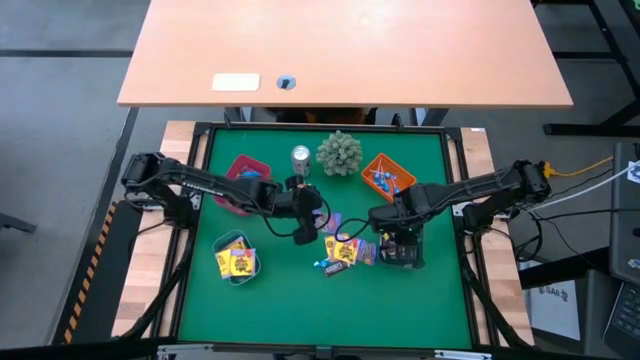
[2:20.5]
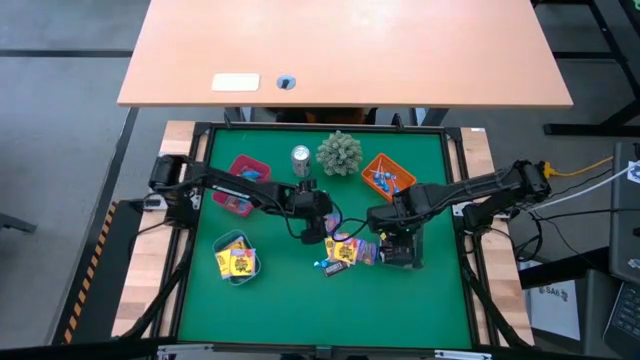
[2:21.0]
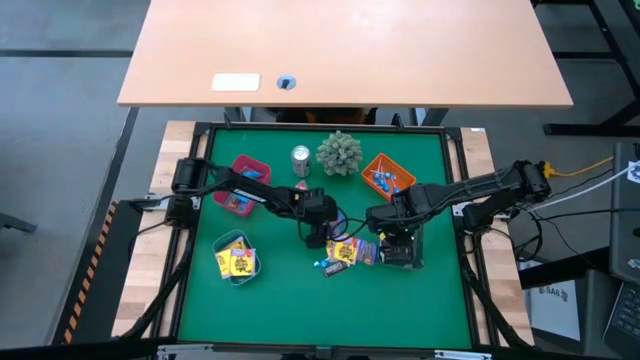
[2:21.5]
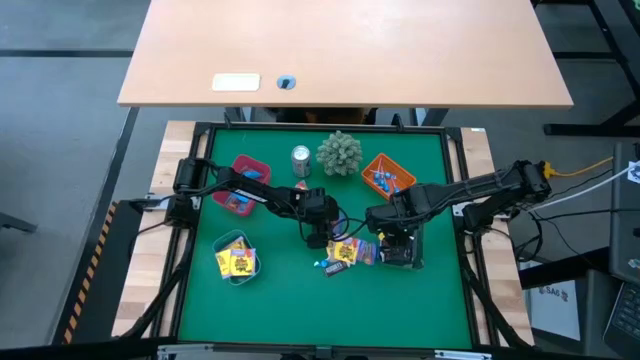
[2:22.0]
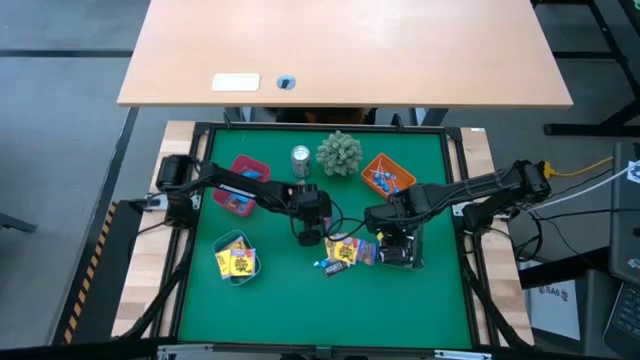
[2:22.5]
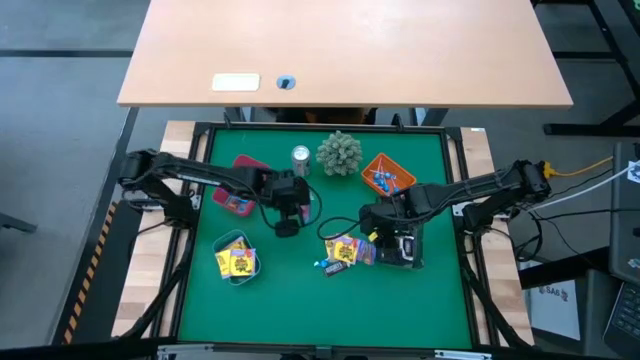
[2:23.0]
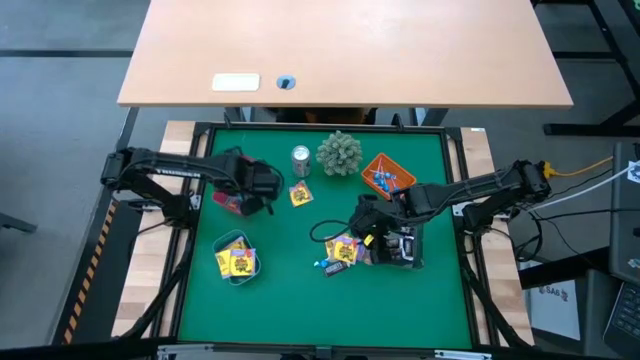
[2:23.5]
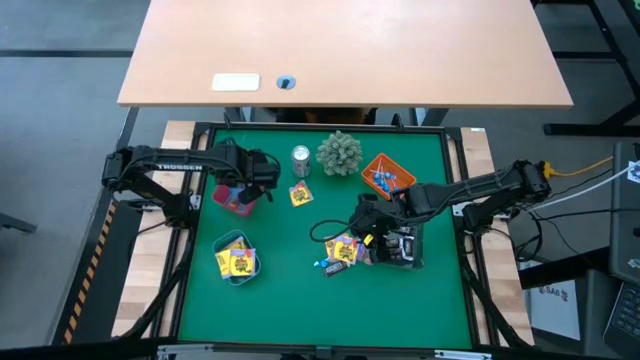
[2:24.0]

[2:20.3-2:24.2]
Task: Sort candy
Put the purple gummy into the red transparent bin

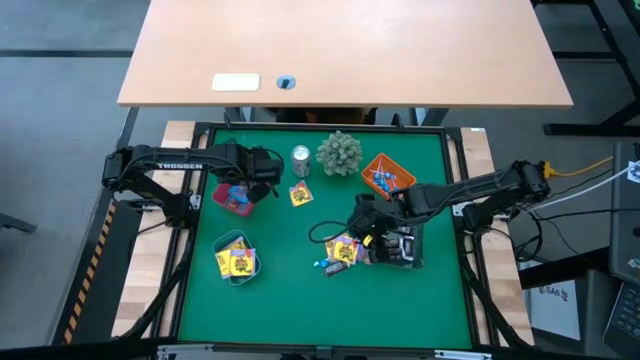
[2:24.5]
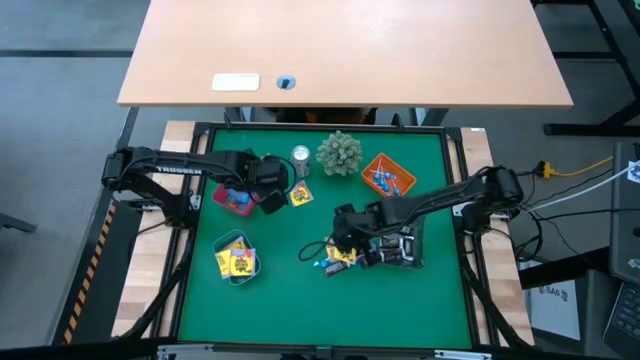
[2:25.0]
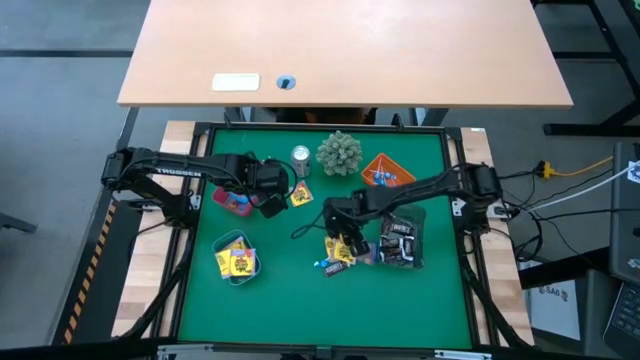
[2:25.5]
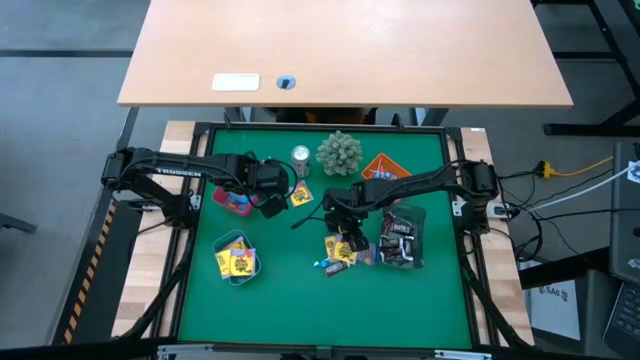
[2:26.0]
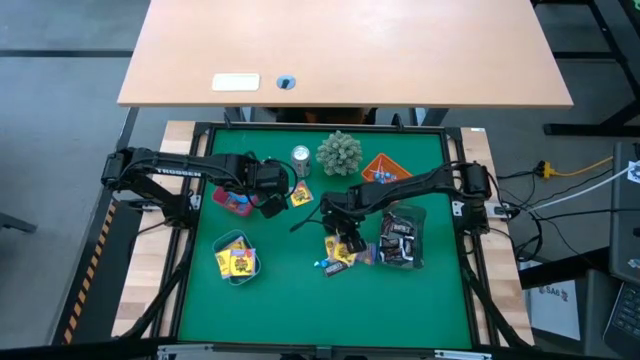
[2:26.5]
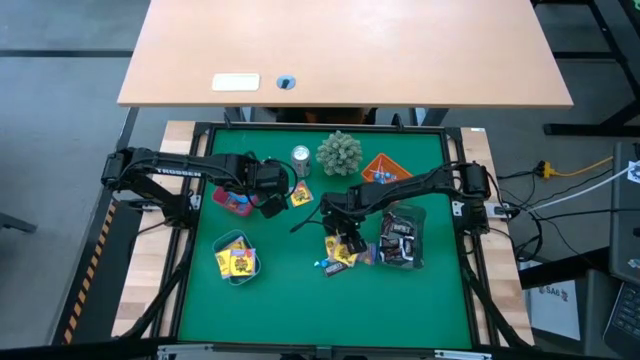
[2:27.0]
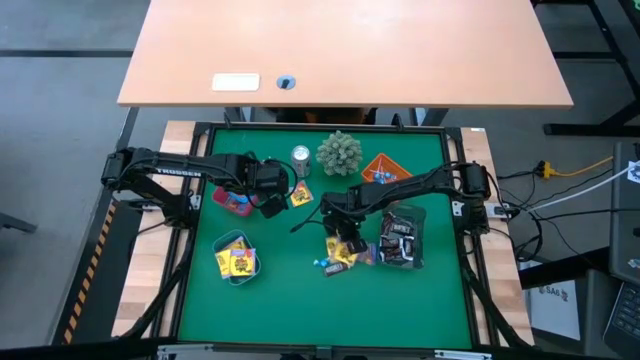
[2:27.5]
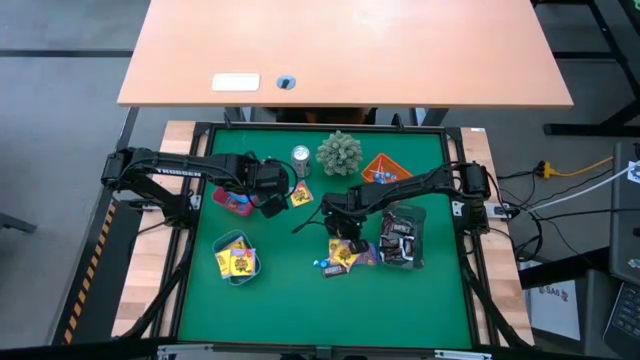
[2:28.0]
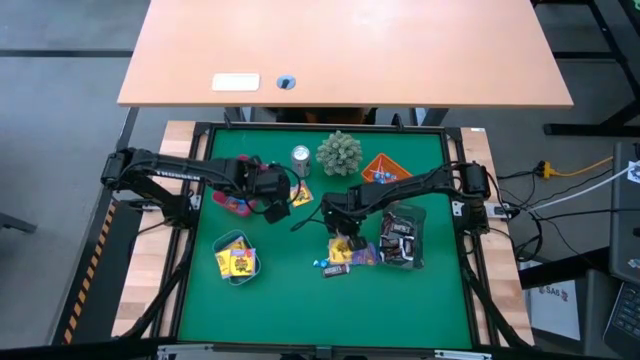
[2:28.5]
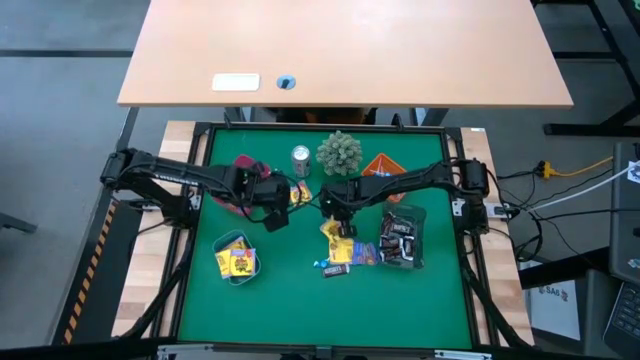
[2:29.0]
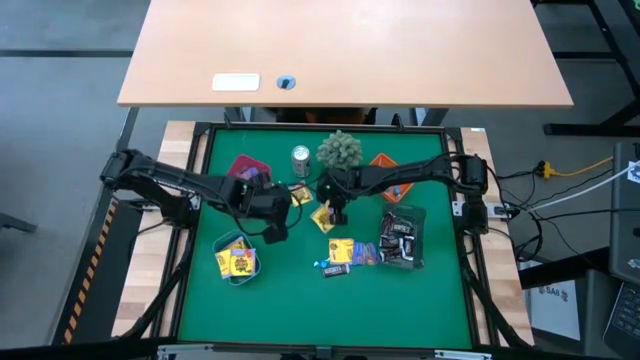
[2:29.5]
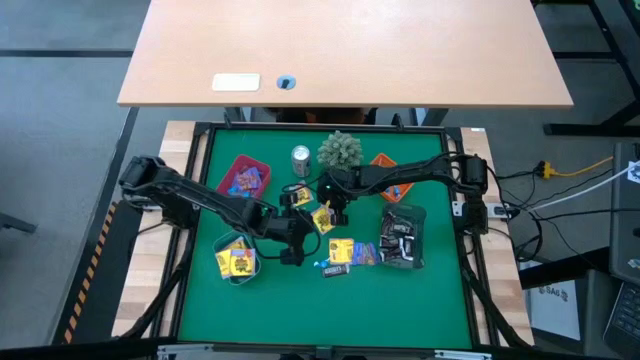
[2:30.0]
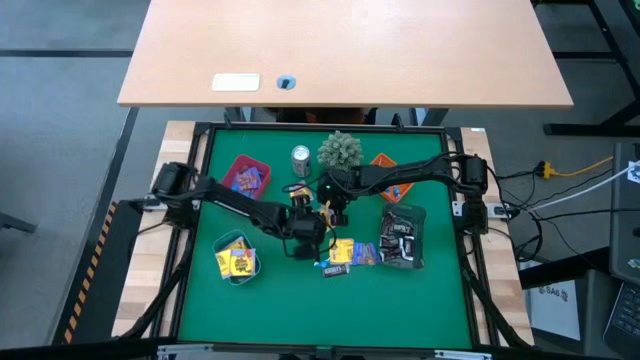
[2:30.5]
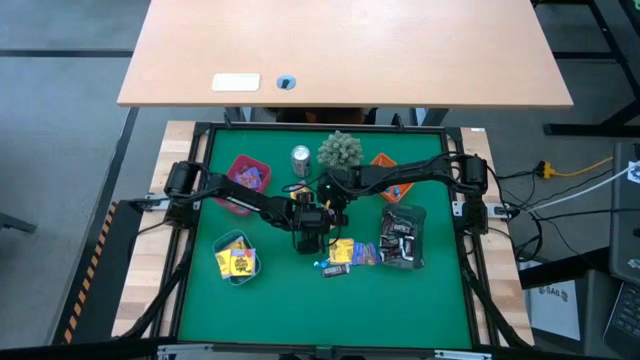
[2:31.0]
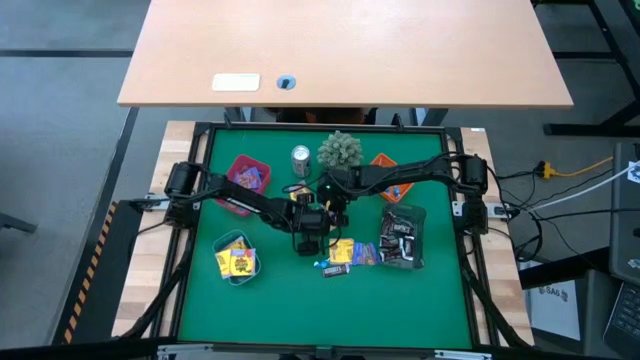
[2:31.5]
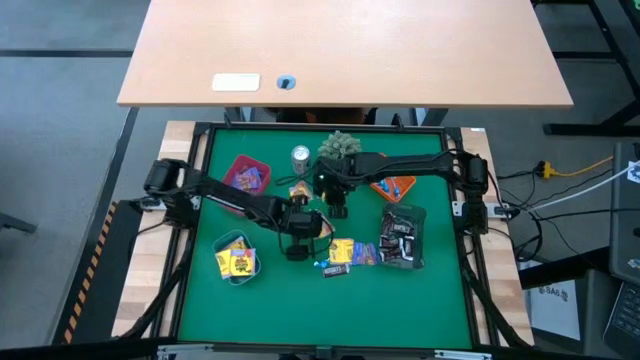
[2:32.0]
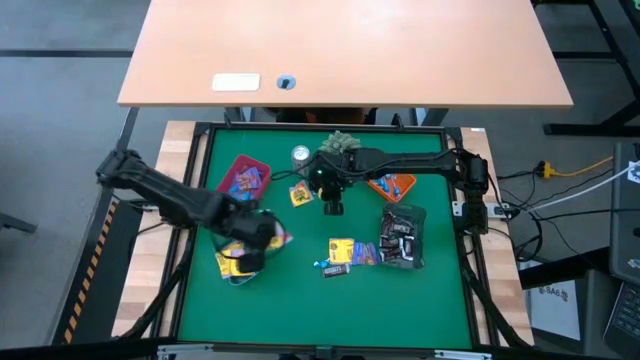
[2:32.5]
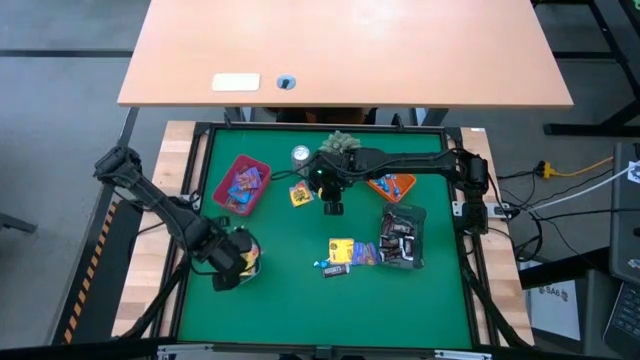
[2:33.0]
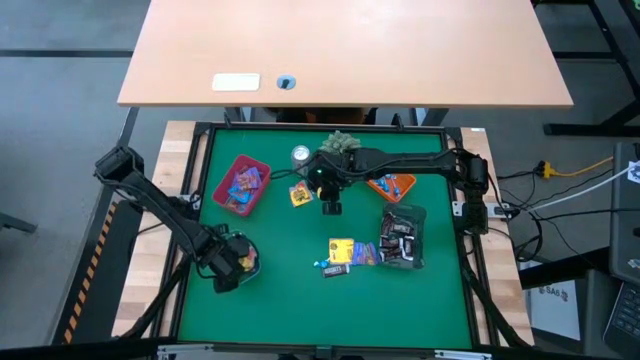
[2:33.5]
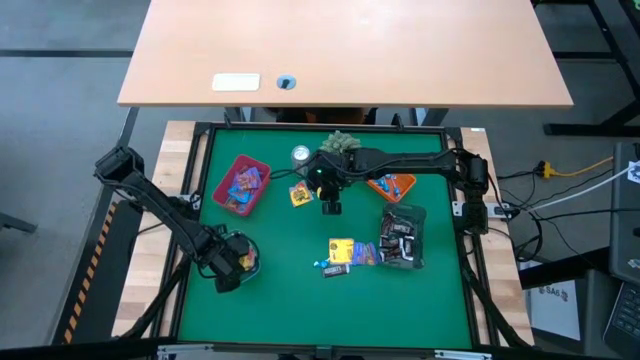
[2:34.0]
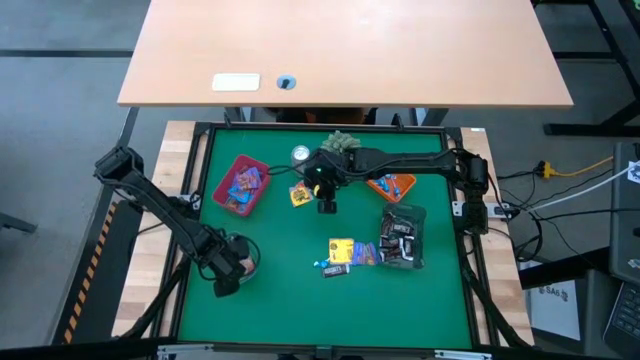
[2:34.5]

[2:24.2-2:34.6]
Put the yellow candy into the blue transparent bin

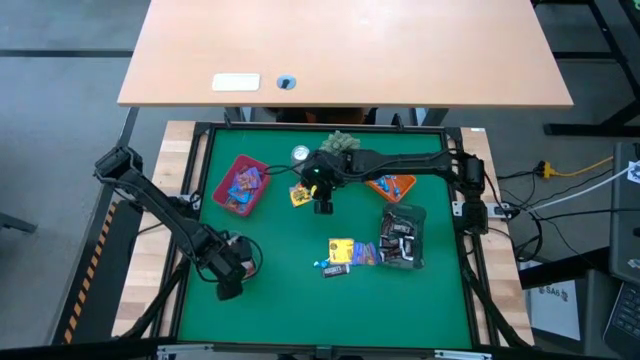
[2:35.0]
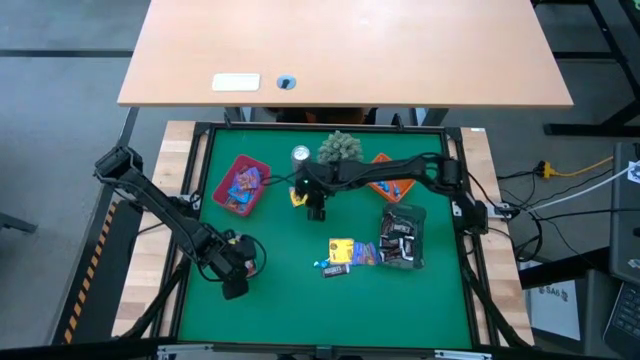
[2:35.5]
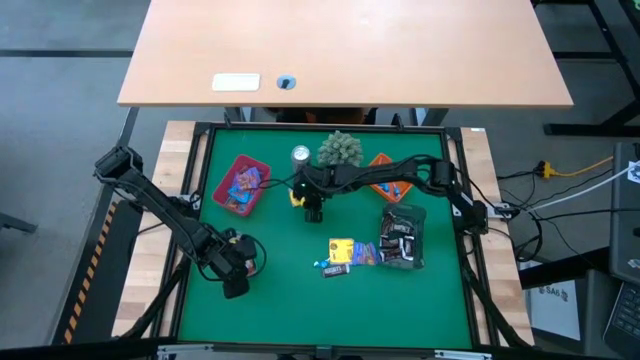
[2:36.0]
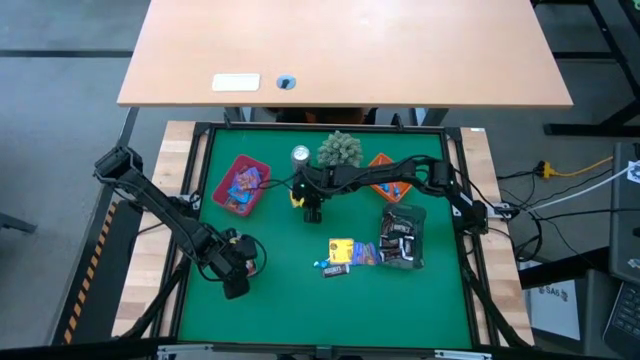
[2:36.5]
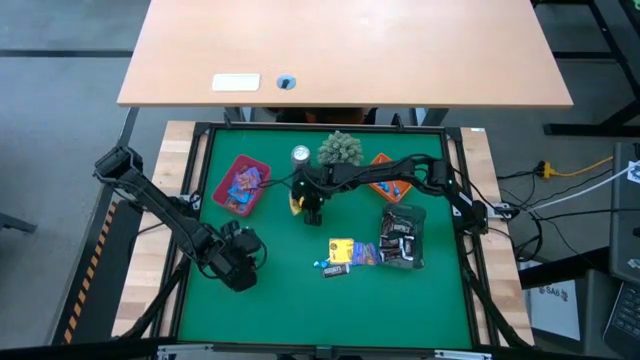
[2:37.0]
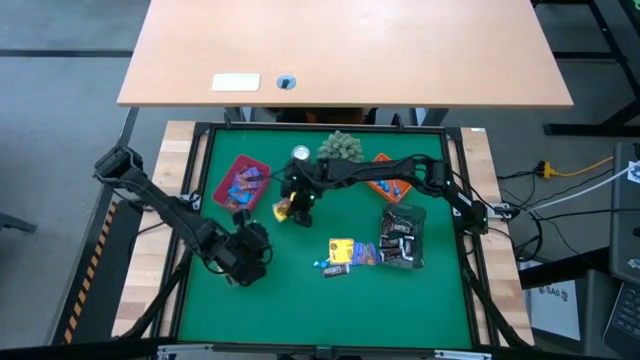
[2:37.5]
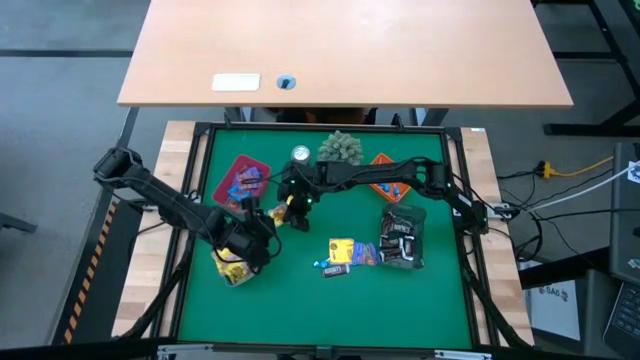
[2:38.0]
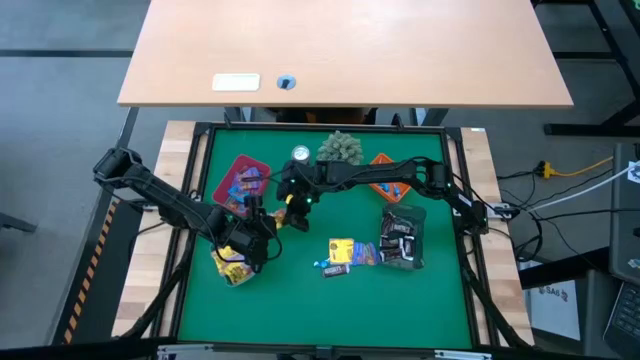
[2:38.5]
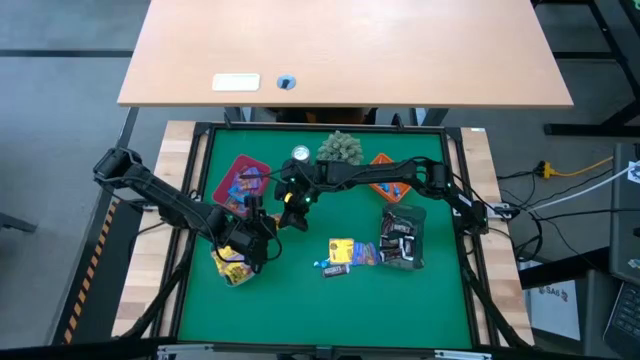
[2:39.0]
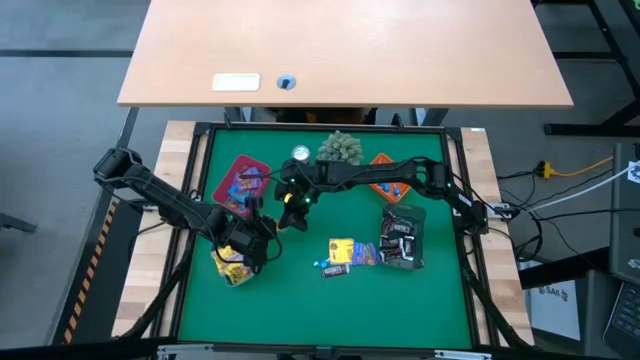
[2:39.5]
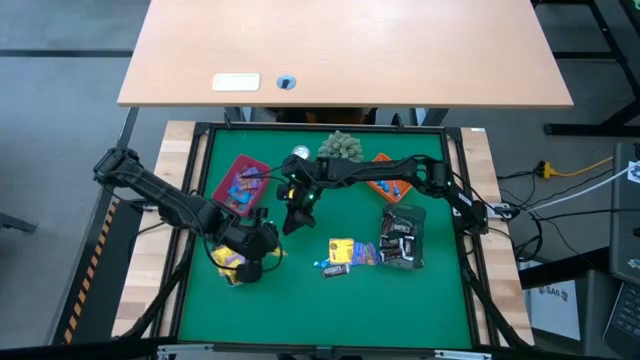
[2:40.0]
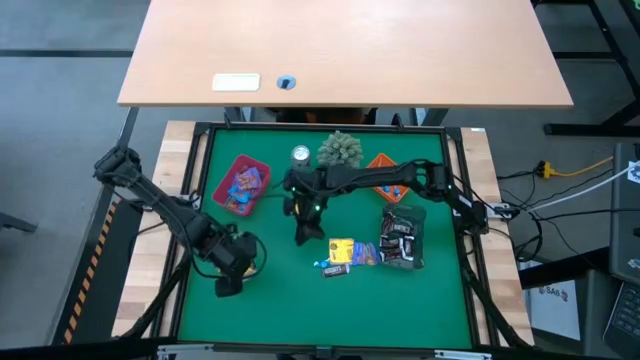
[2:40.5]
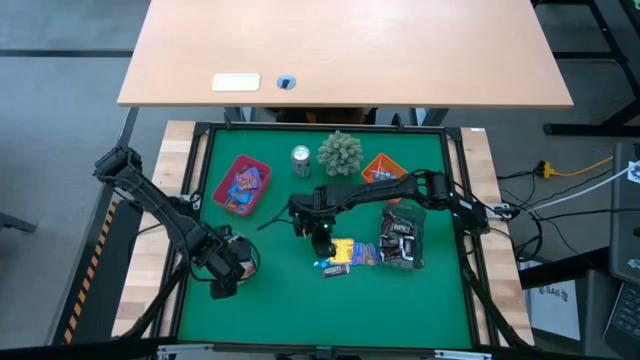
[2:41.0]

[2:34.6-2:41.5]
Put the yellow candy into the blue transparent bin

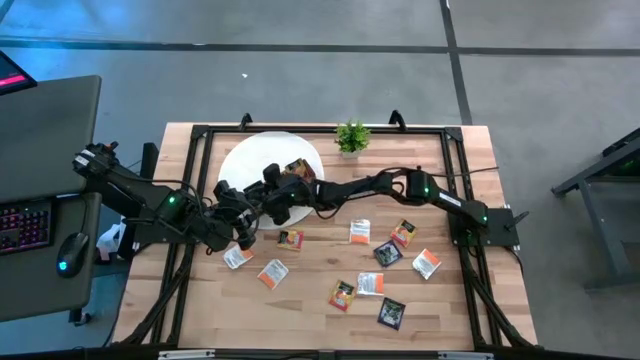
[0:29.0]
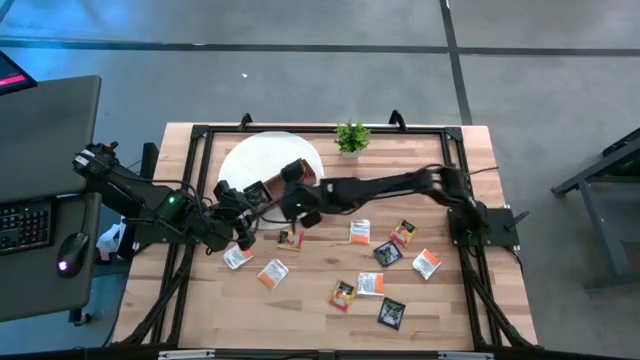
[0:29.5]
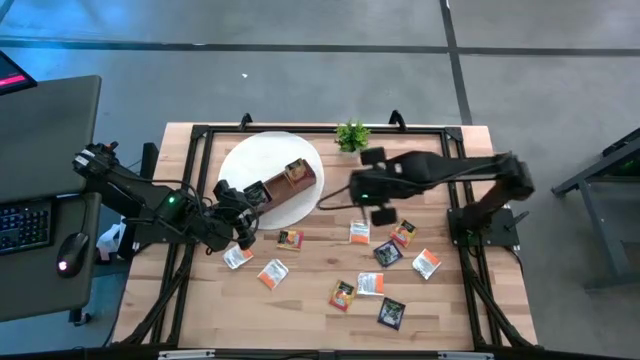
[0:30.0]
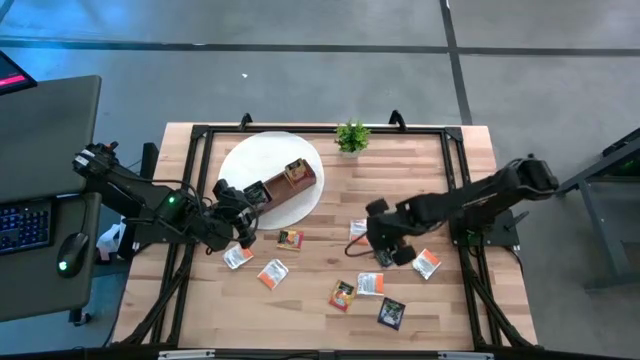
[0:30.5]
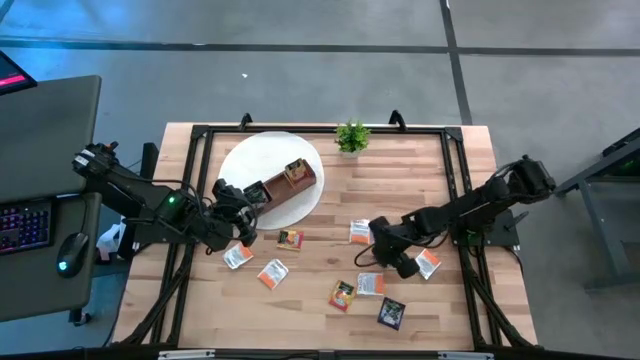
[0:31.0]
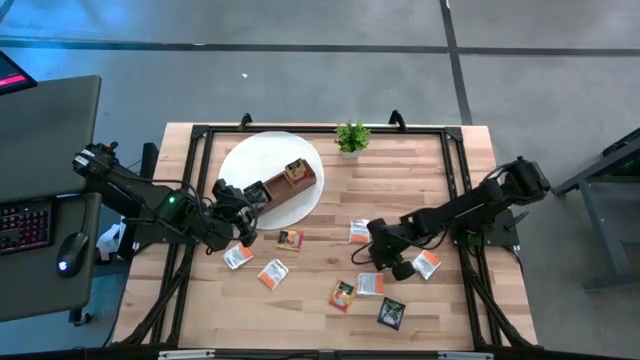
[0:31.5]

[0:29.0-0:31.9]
Task: Pick & Place Tea
Put the purple tea bag into the left section of the wooden organizer
